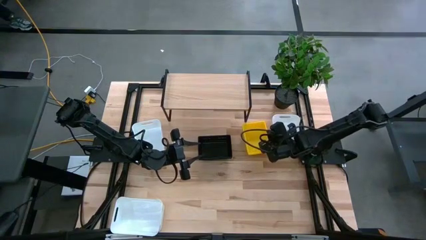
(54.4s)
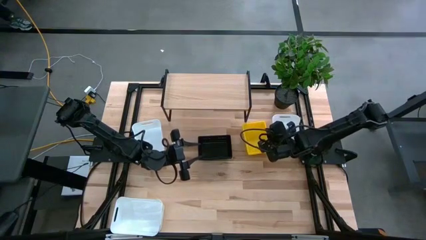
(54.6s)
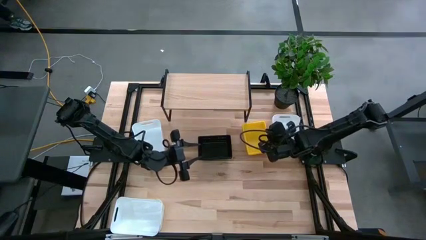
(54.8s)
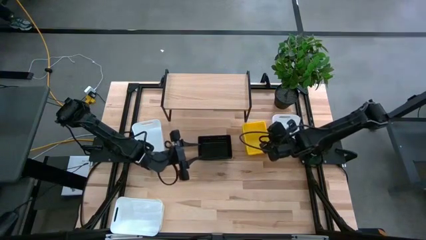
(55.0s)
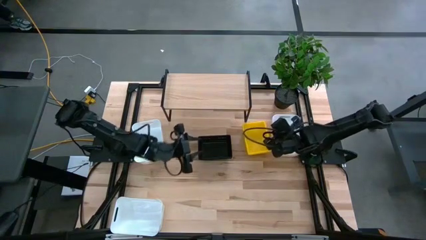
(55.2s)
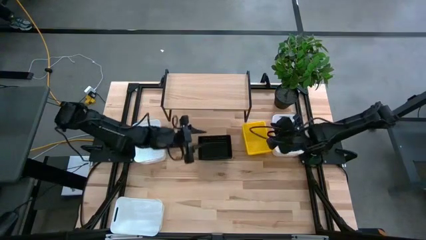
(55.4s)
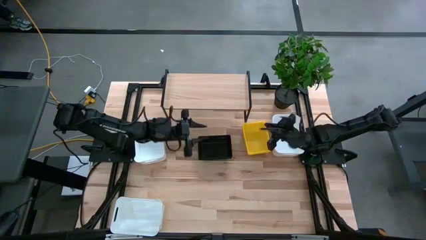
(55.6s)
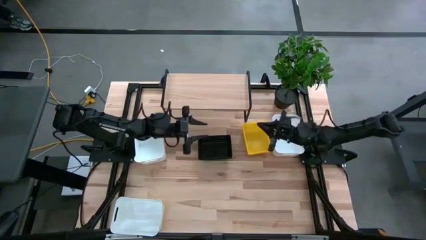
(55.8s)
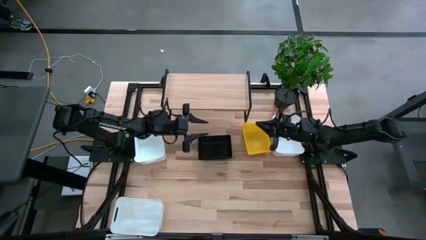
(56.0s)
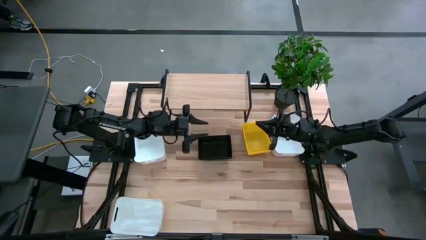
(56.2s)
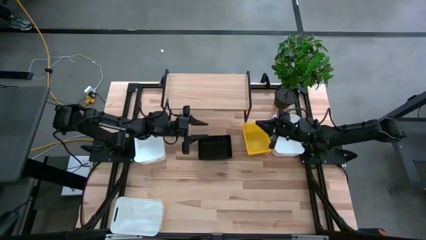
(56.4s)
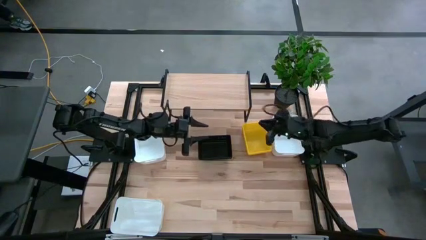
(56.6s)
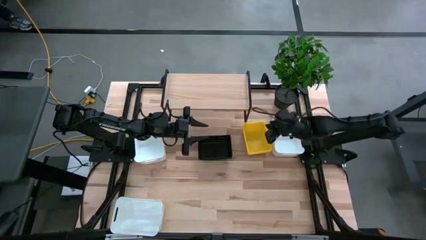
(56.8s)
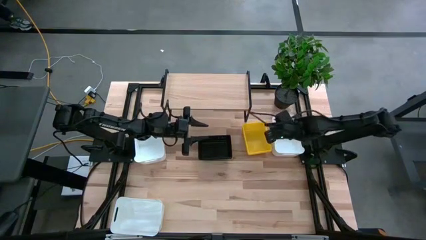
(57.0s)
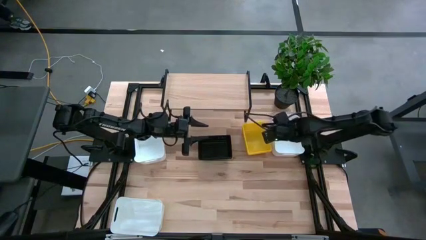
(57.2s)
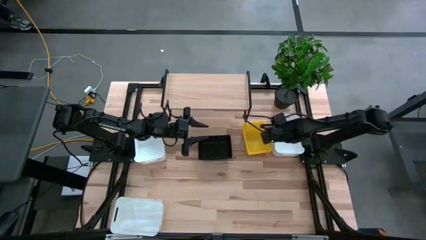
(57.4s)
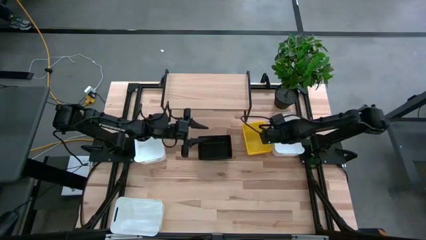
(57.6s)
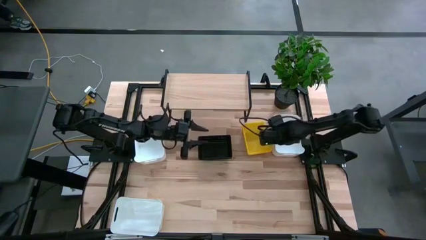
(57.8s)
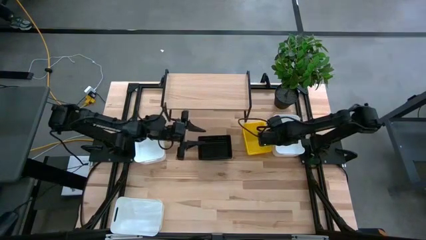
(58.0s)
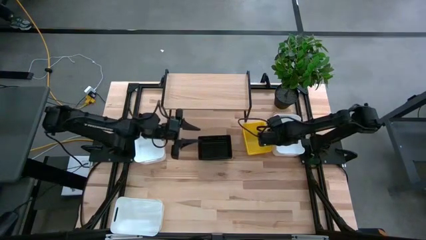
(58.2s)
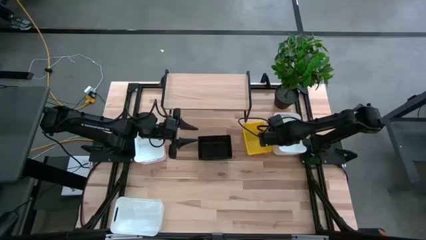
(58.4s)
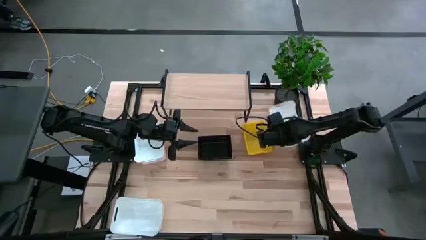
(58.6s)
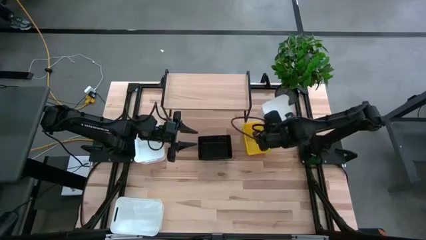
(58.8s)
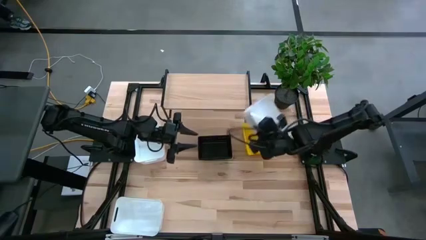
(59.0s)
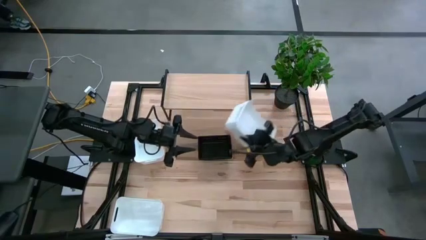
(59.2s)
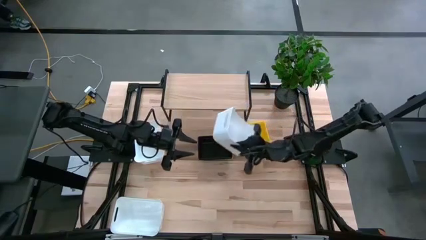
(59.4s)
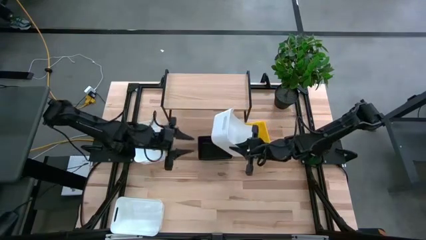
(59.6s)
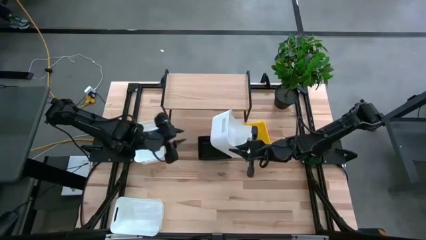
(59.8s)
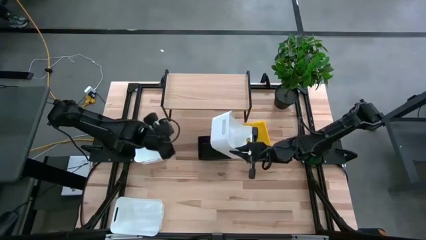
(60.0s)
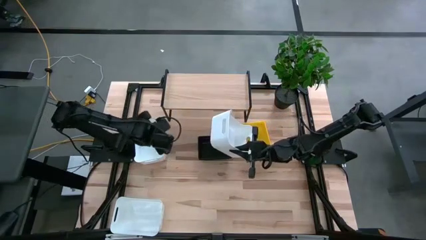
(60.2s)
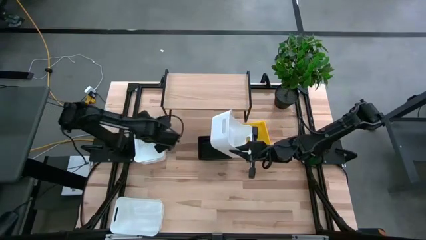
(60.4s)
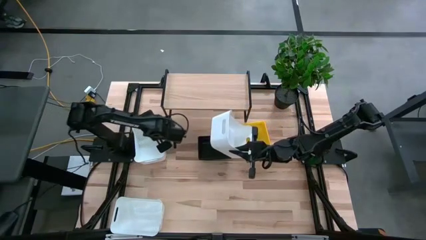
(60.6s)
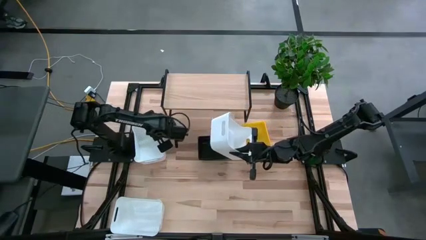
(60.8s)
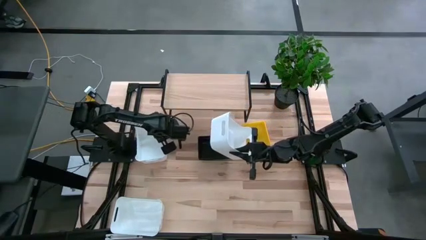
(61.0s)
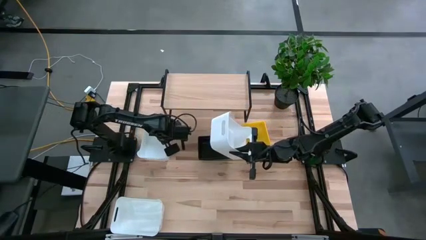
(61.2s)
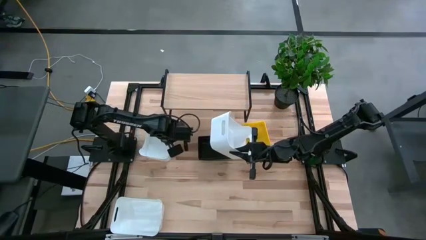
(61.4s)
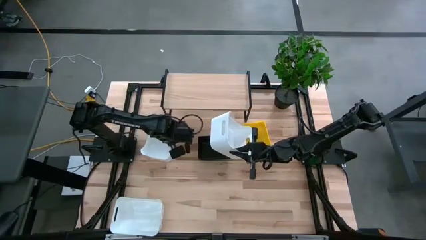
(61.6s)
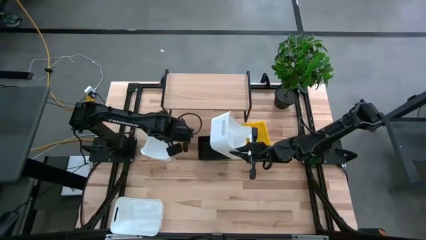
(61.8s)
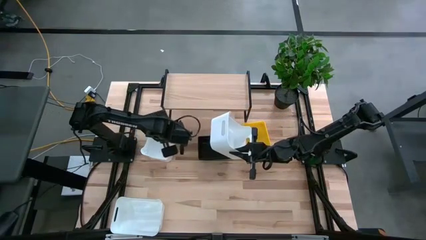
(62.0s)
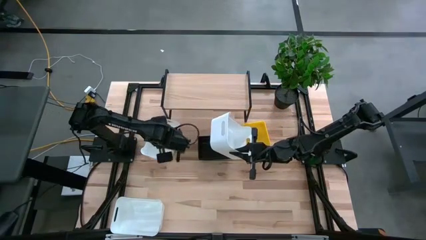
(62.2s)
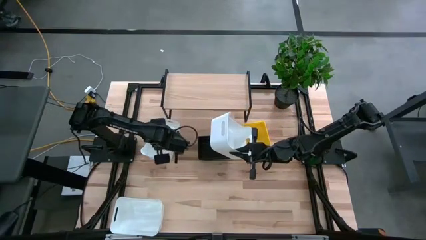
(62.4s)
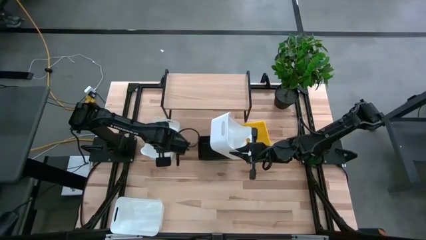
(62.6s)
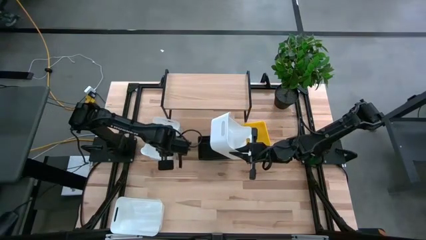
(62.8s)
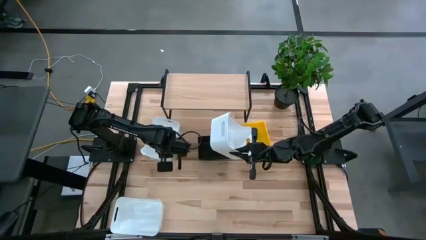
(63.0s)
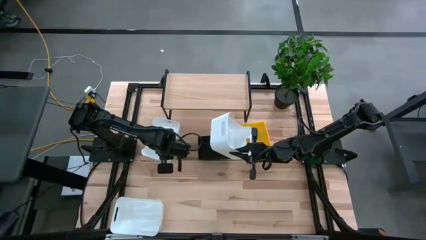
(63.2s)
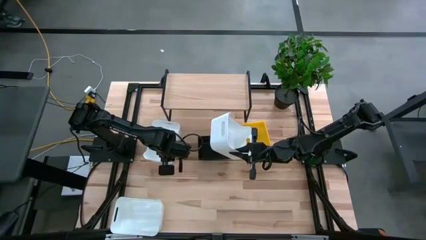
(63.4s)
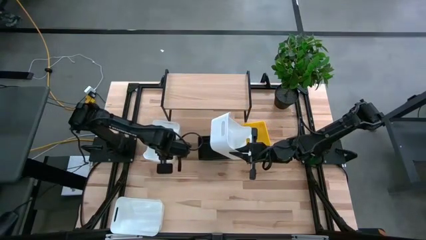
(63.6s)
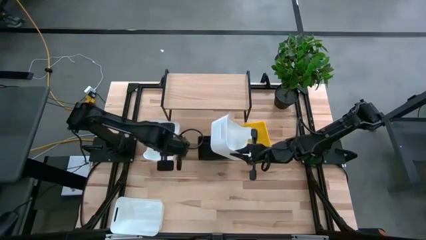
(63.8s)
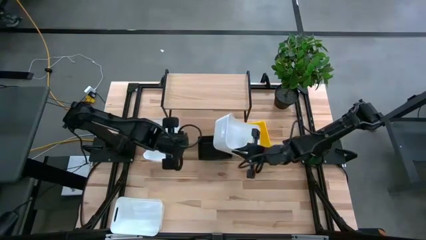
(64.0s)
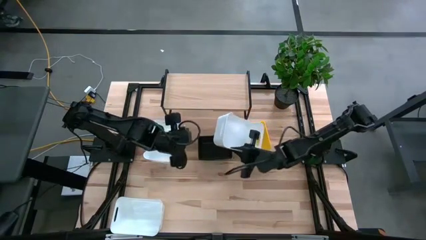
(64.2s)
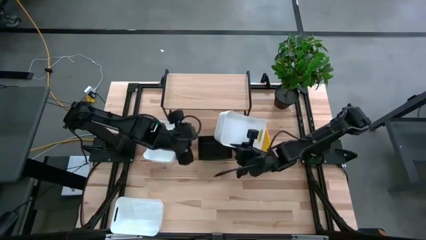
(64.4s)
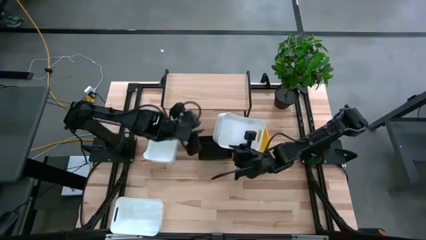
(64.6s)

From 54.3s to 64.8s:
Task: Stack baskets on shelf by color
Stack the top right white bin on the top left white bin

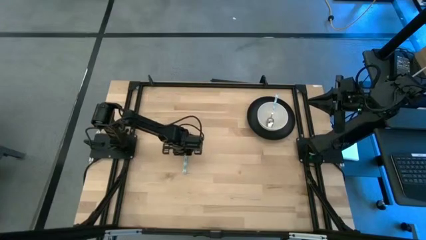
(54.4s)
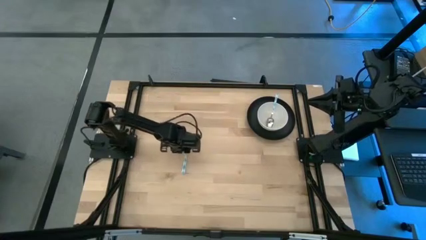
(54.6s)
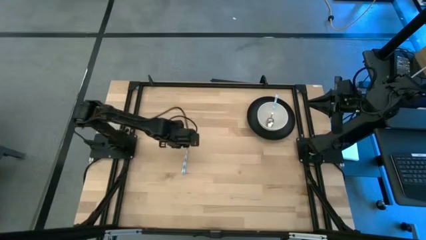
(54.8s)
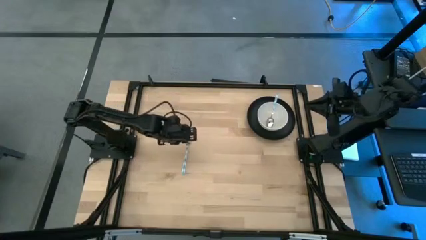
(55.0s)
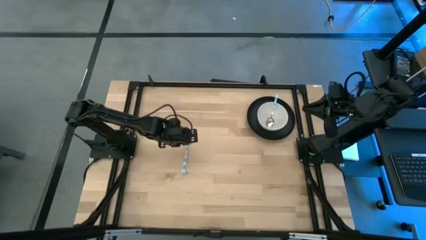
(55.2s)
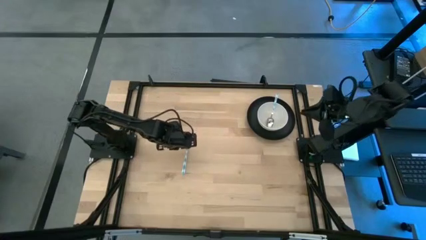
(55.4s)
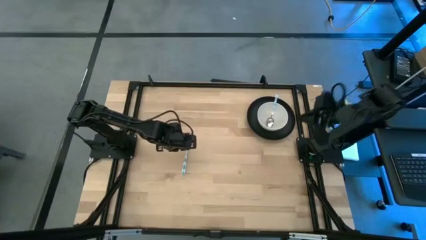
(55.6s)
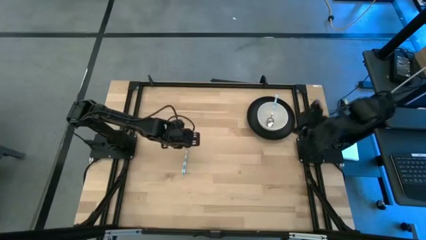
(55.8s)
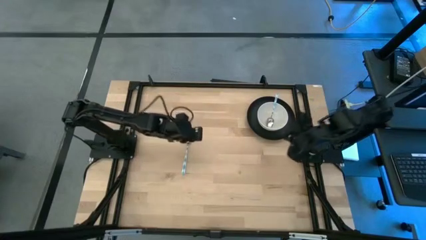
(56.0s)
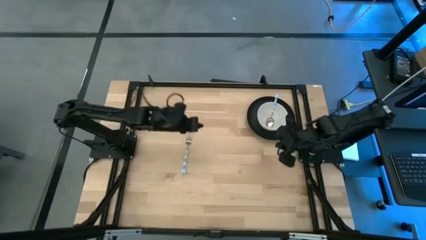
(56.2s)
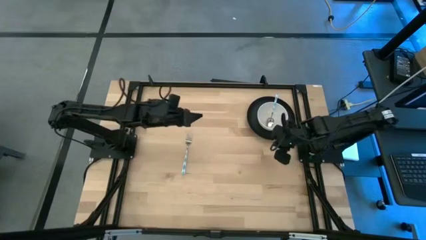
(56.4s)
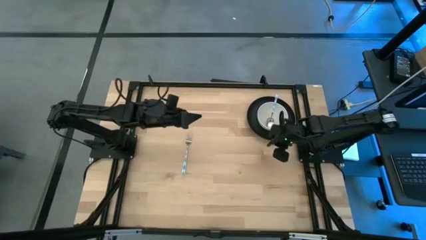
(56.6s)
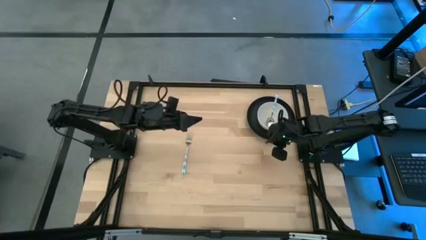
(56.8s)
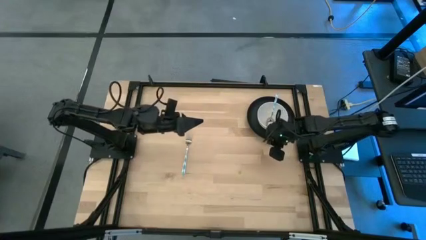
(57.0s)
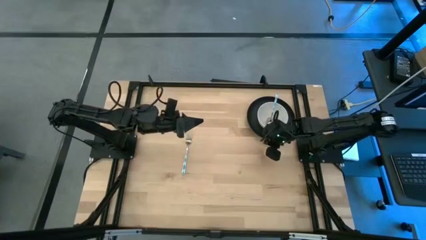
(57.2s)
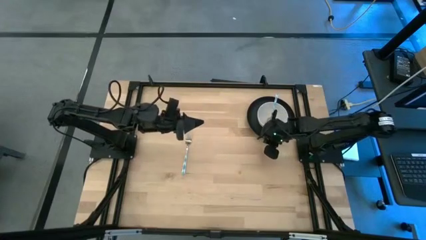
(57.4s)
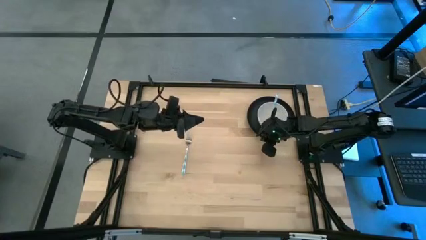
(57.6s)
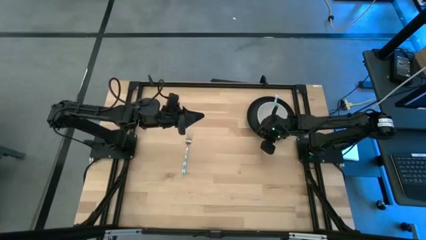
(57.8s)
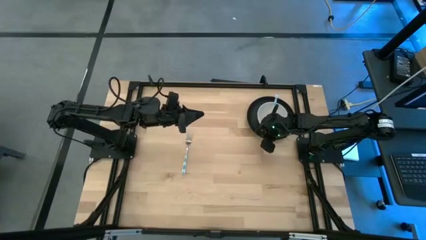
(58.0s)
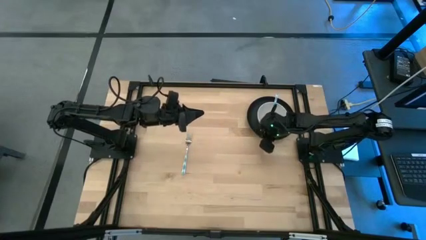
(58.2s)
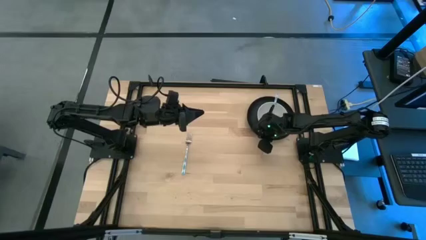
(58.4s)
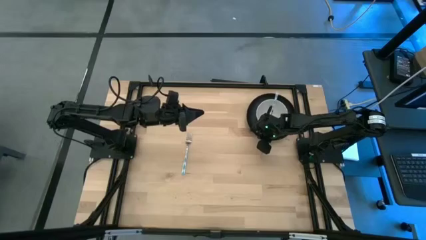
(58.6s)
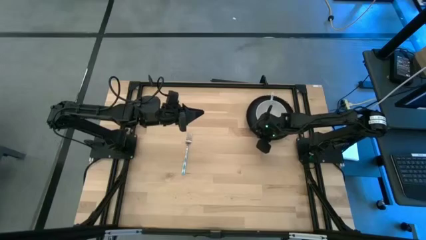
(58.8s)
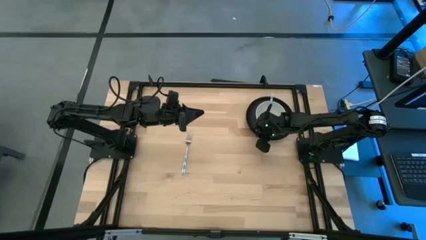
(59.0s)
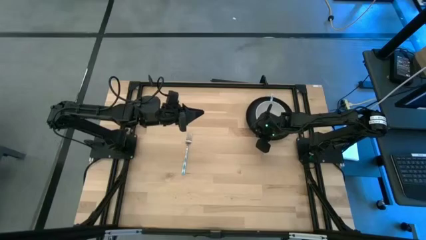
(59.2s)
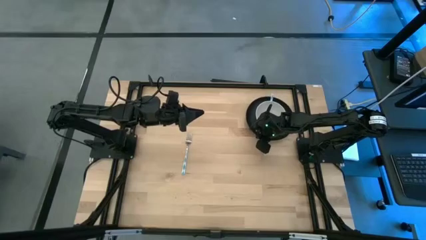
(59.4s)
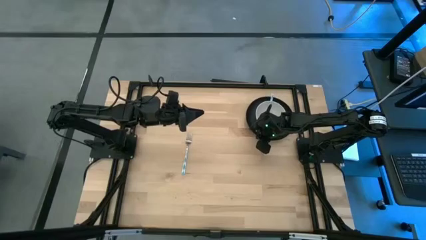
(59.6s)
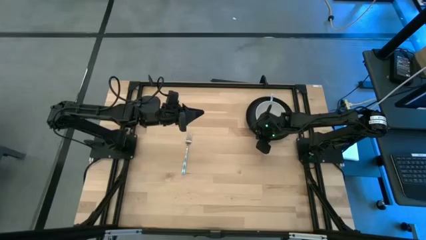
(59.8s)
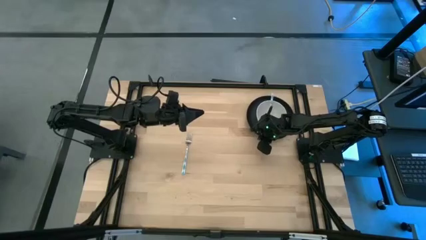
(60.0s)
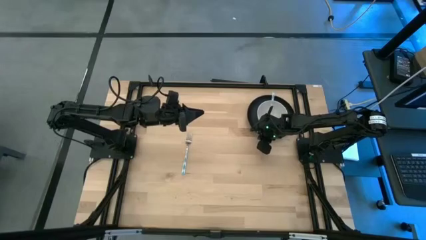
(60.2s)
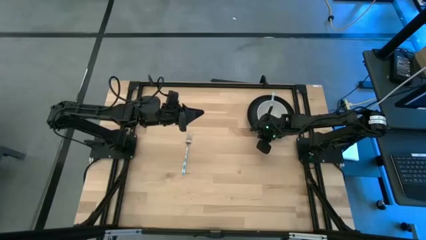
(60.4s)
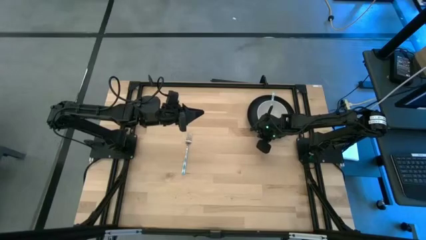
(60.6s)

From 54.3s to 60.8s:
Task: Set table place
Move the black plate to the center
